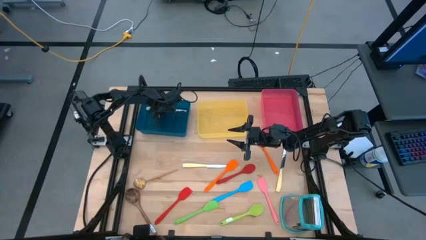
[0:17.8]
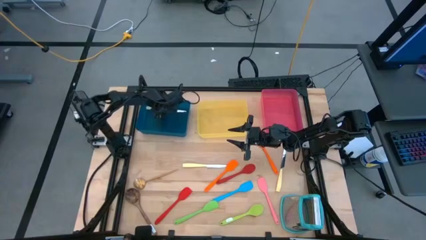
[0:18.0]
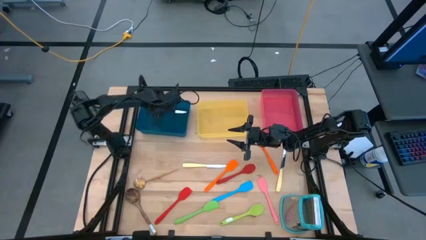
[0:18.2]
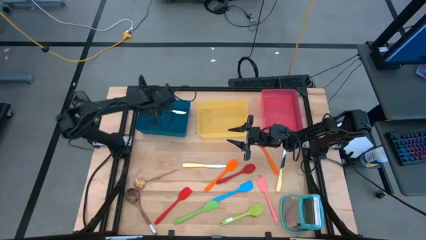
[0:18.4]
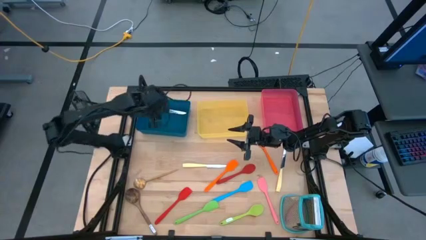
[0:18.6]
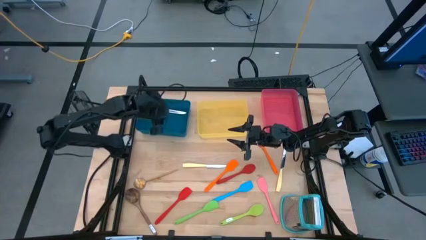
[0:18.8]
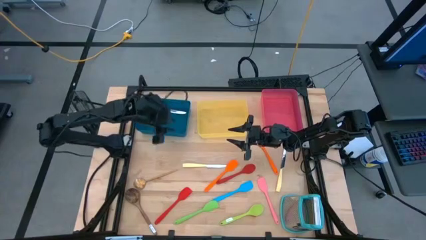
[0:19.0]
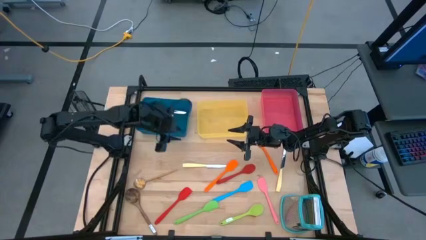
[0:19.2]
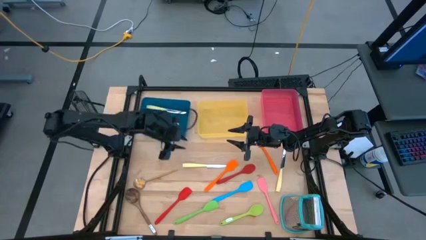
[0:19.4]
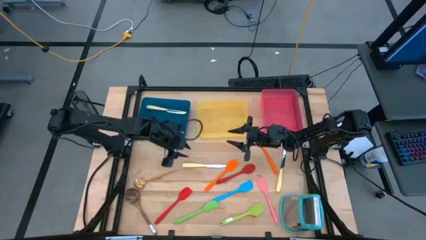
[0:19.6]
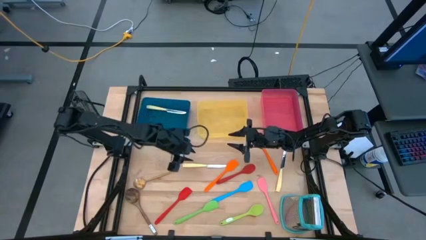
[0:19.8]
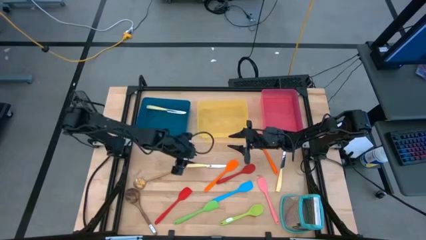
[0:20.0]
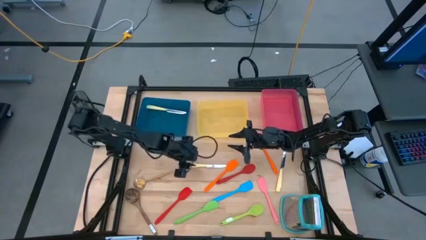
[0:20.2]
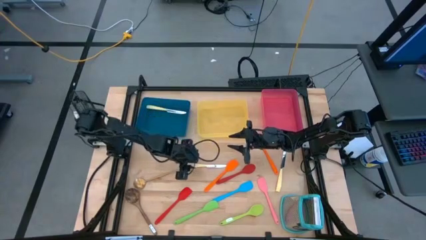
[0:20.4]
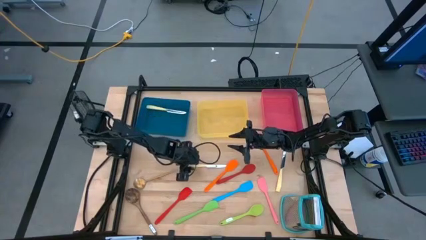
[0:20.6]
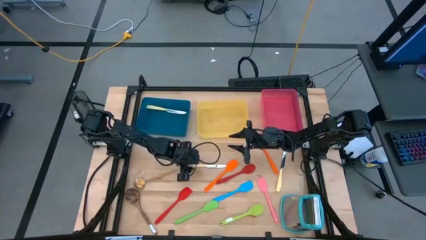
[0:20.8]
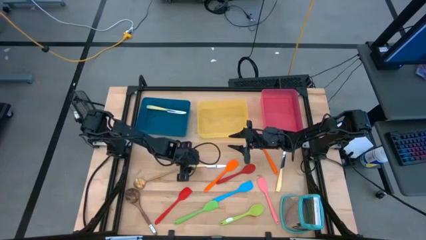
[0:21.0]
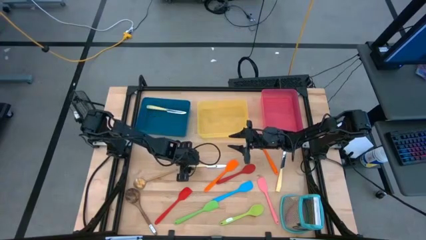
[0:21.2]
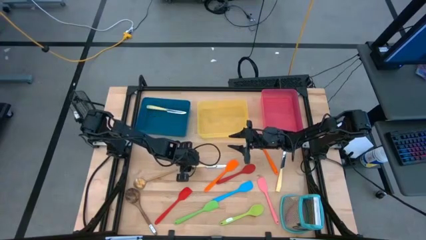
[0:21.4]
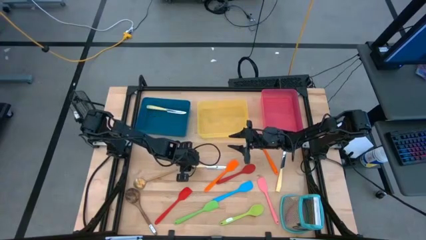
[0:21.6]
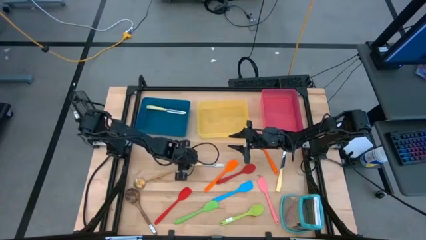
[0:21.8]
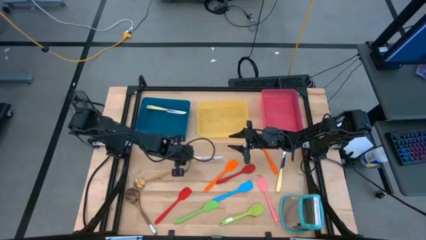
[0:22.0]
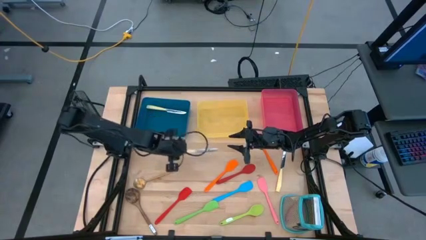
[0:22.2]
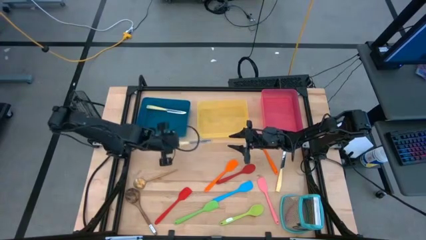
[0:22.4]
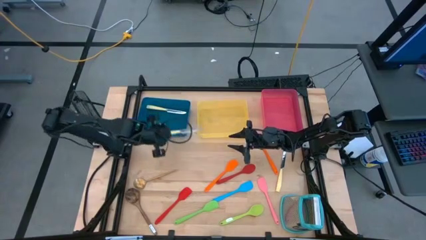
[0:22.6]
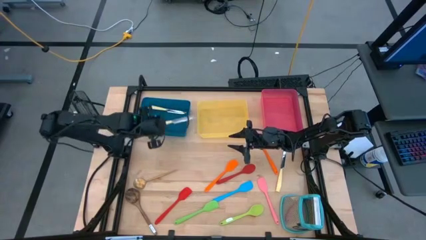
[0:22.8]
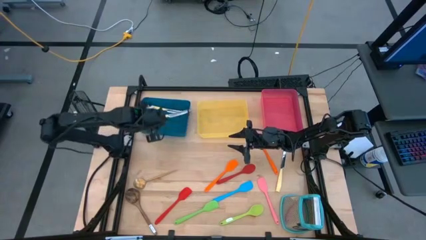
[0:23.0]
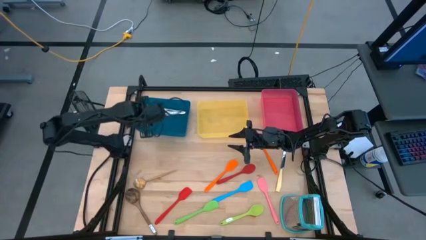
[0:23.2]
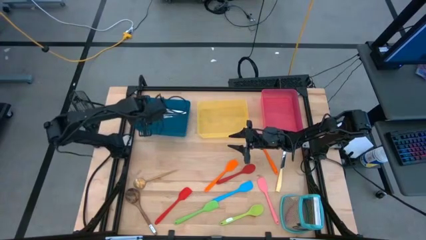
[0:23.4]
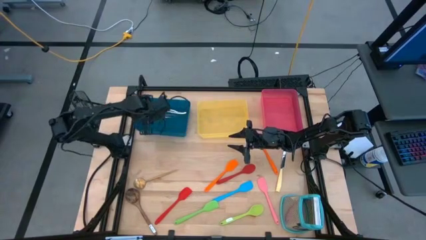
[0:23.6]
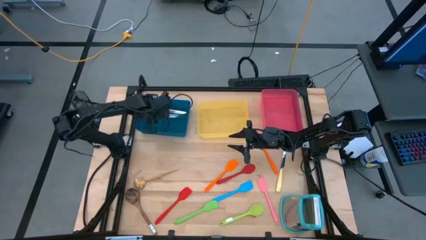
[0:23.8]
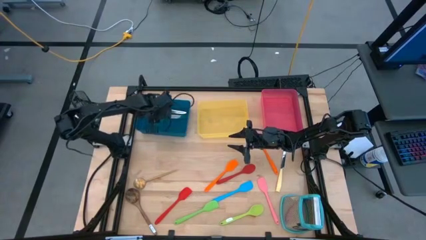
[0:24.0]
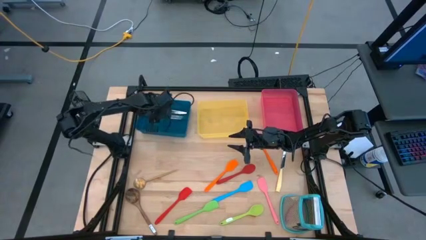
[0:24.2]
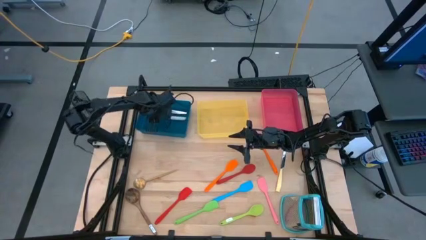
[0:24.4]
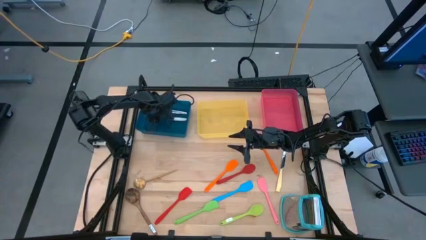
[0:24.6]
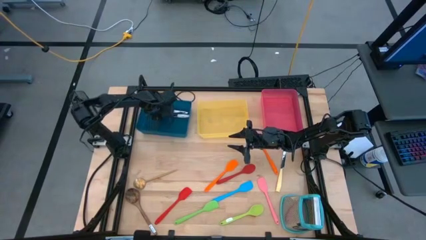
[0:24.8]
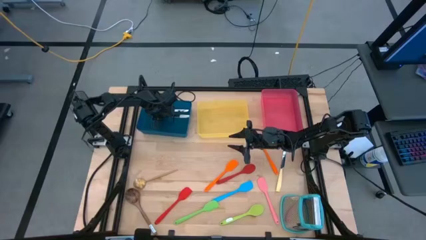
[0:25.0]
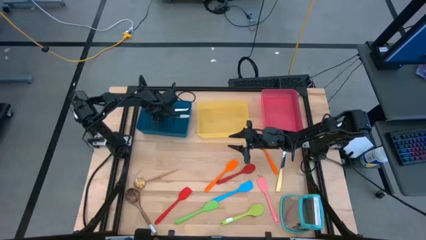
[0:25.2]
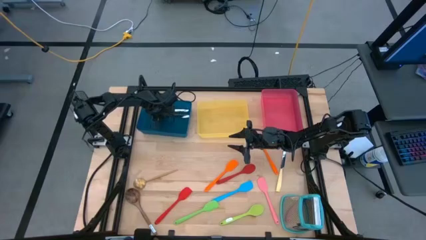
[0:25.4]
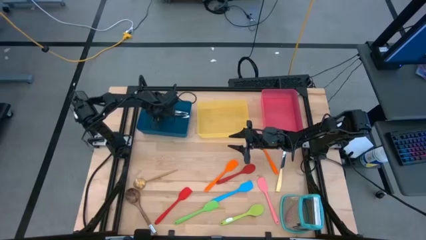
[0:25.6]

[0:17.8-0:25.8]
Task: Pick & Place Kitchen Items
Put the left yellow knife into the blue bin

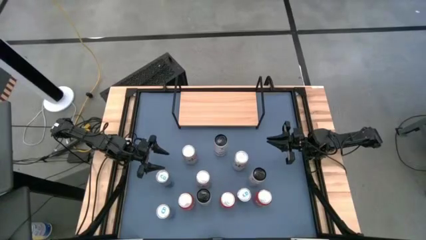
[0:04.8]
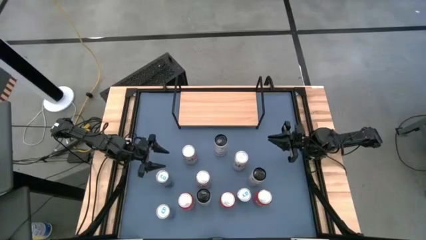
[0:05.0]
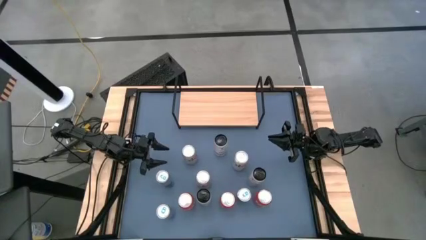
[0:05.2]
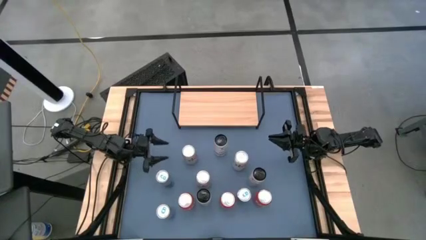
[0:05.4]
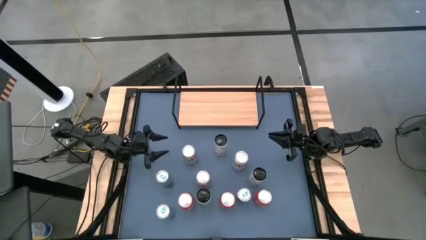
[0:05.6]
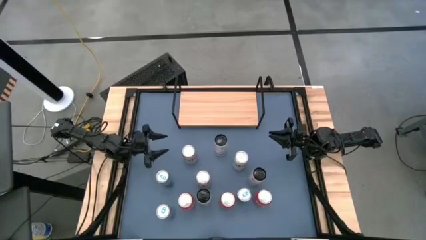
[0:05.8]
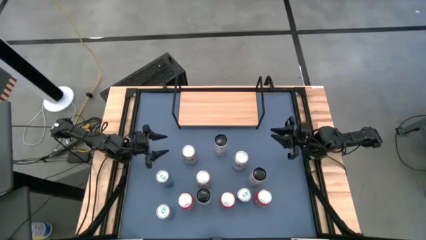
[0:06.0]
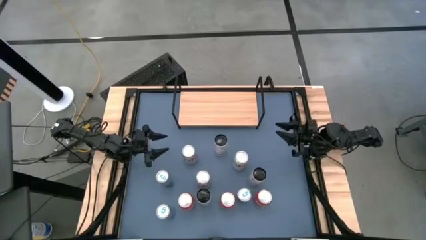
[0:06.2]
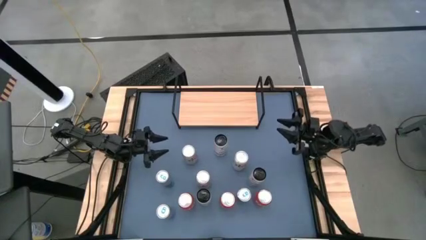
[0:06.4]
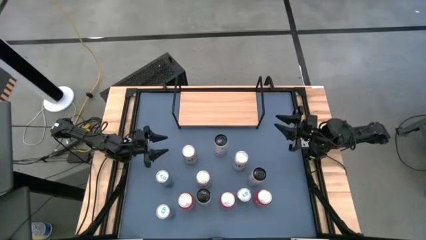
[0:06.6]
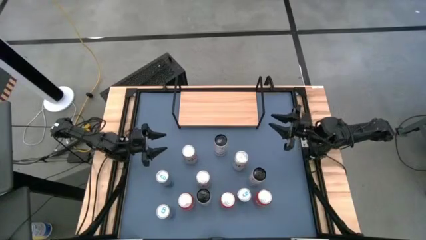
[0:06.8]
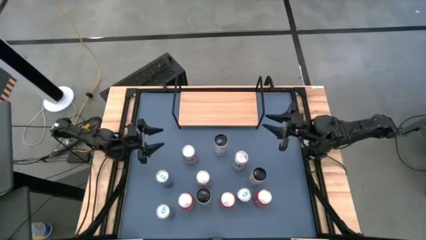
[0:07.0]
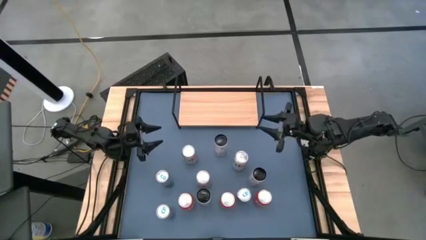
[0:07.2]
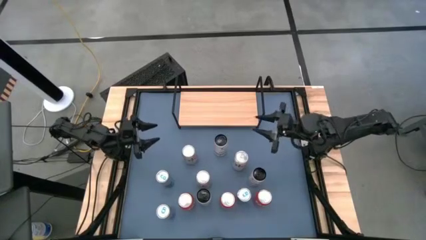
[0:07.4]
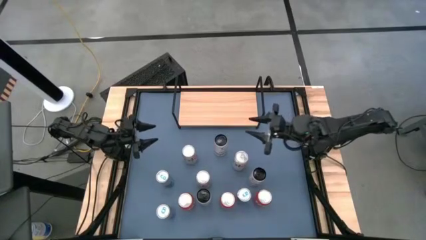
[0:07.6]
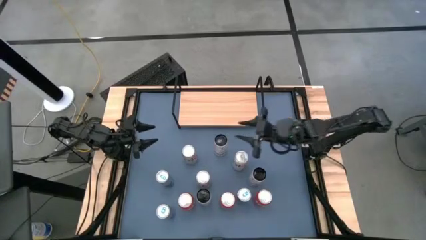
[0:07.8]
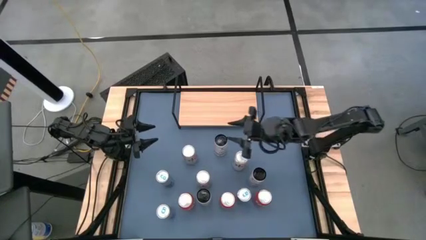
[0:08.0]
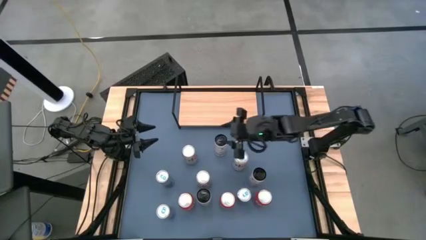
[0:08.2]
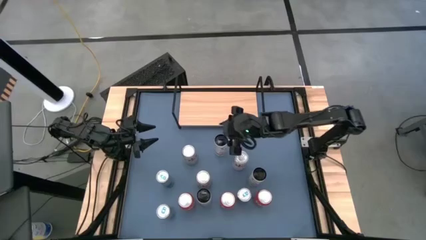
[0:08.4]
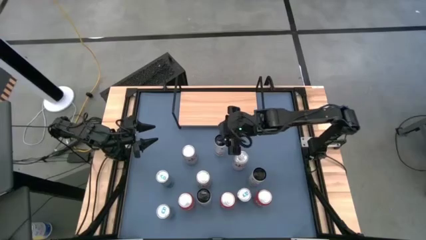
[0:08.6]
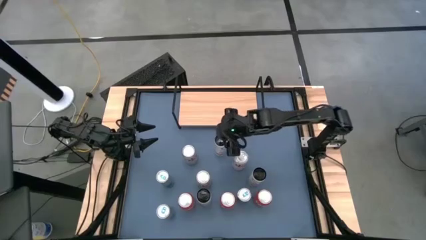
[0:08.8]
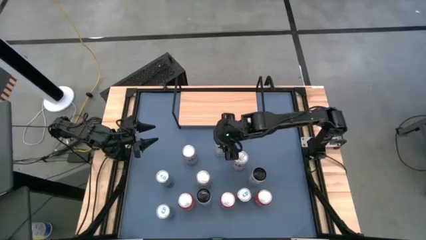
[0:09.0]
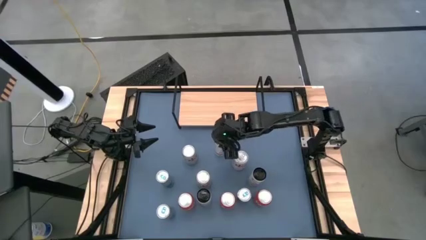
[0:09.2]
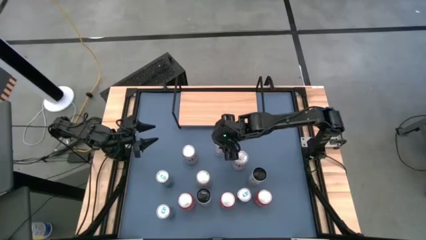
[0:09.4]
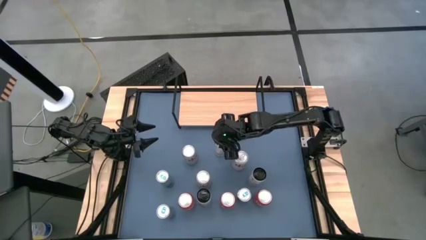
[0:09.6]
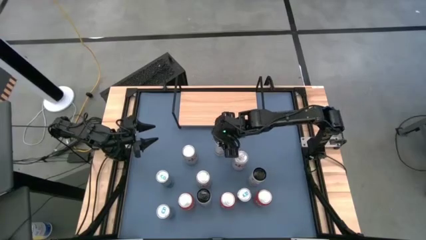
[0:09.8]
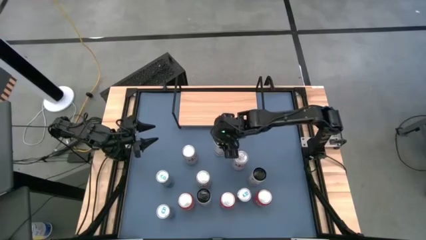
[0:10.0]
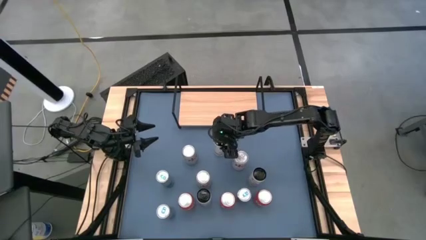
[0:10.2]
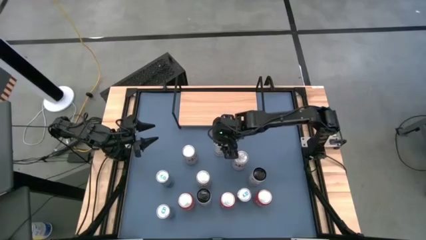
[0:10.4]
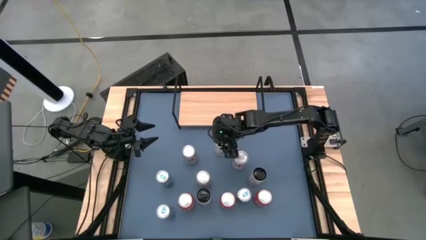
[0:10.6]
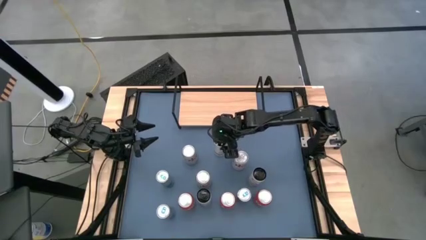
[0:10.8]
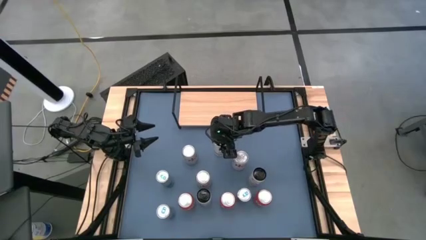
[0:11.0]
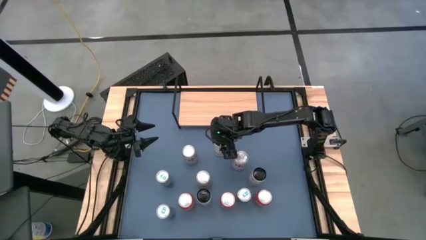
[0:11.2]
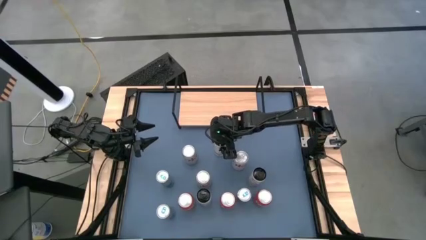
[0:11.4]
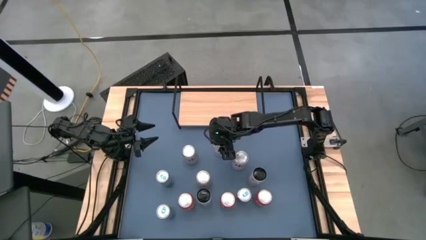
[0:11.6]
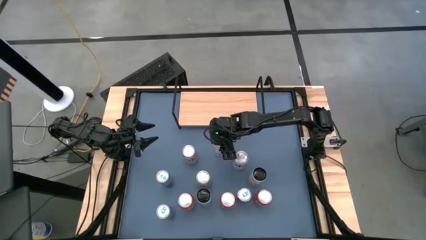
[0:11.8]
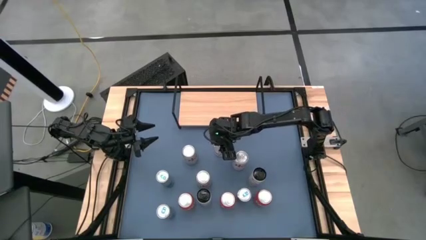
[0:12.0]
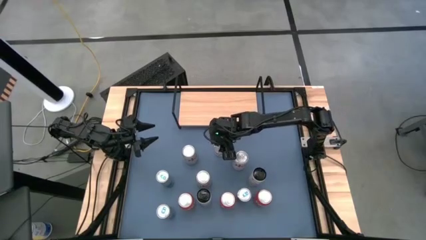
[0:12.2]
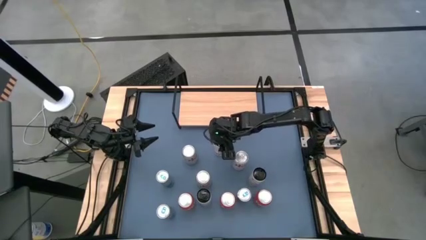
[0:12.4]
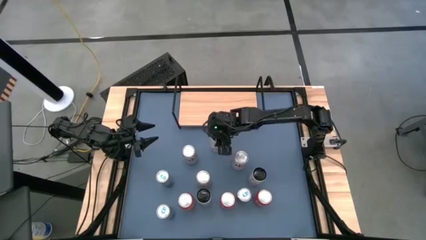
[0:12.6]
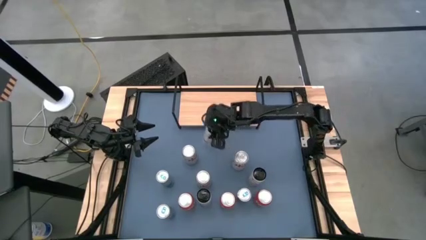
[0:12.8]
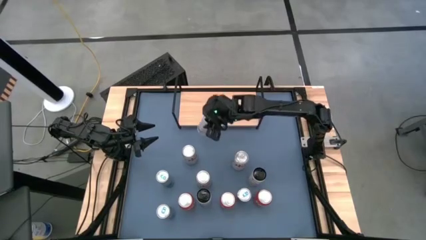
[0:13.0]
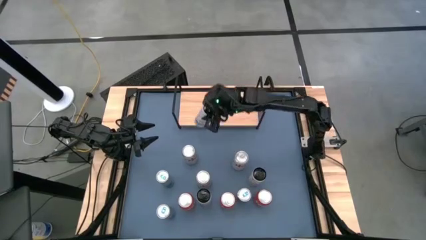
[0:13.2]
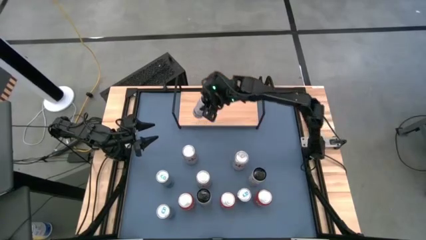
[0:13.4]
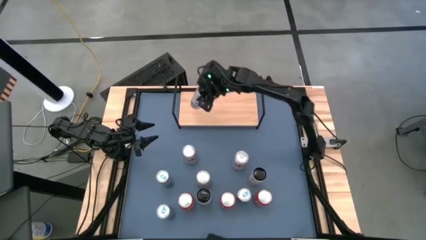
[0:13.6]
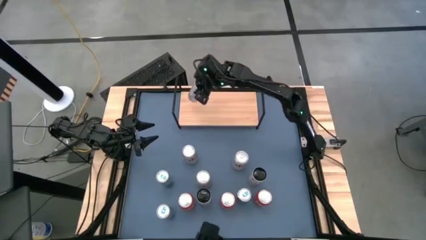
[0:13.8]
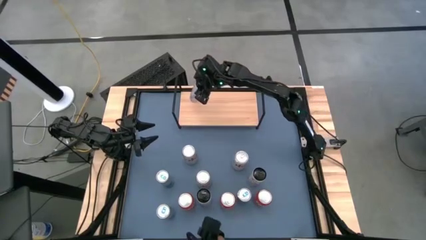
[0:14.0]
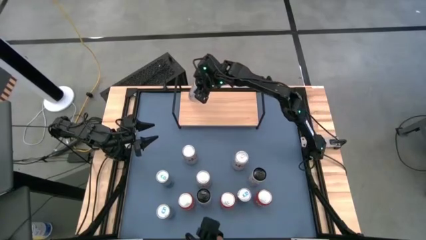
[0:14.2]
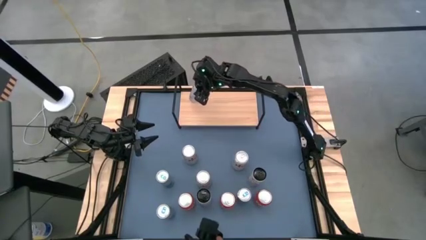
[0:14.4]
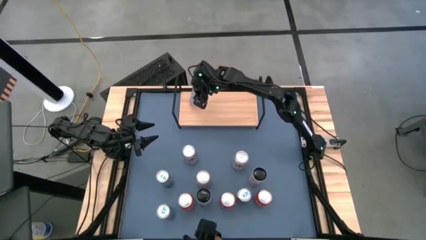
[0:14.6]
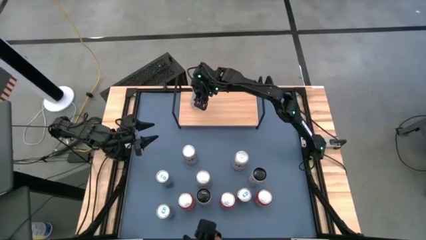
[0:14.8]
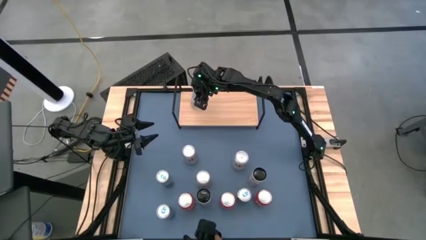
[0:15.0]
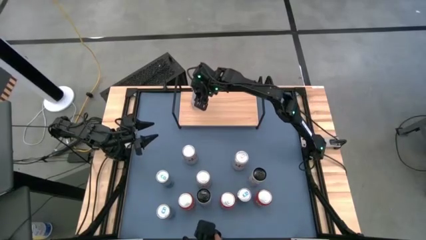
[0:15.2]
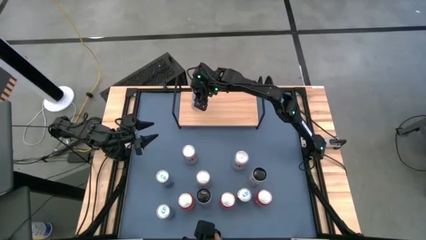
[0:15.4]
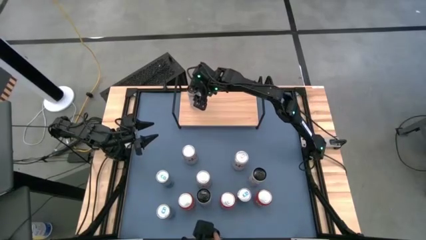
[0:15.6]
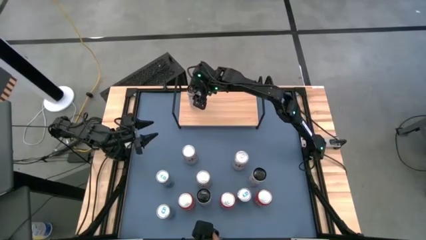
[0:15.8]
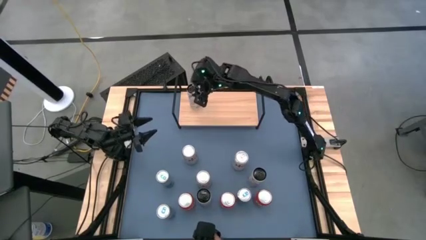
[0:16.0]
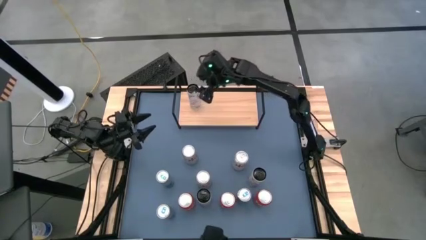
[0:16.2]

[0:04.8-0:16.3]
Task: Place canned beverage on shelf
Put the top white and pink soda can on the shelf
